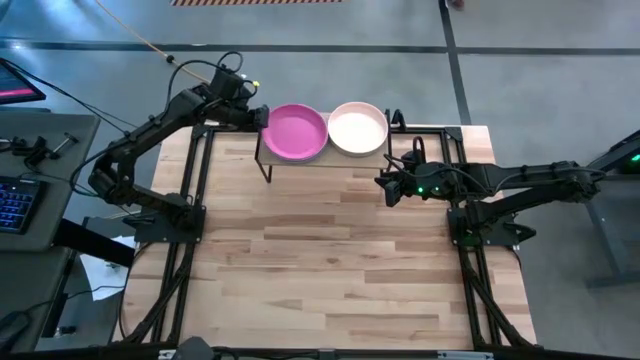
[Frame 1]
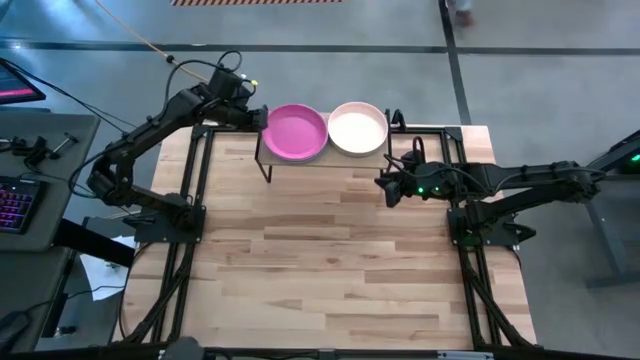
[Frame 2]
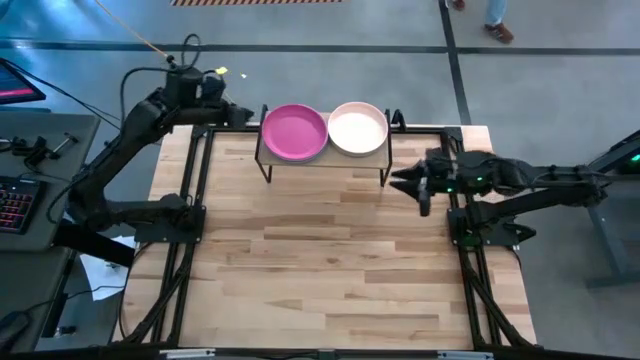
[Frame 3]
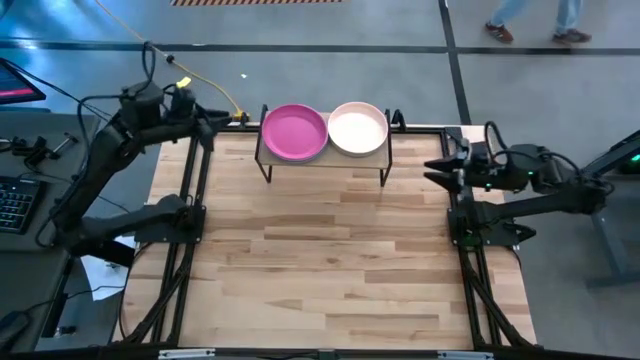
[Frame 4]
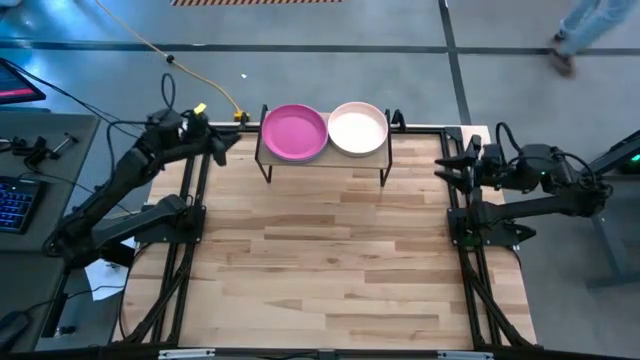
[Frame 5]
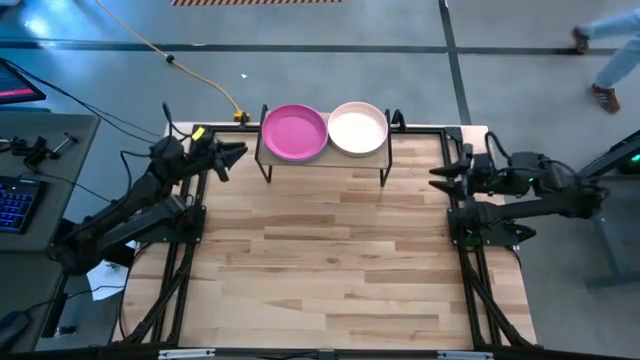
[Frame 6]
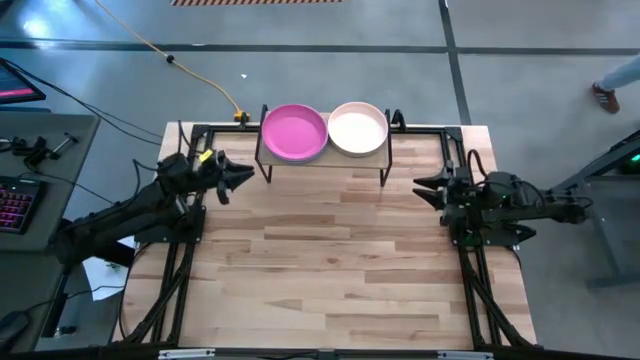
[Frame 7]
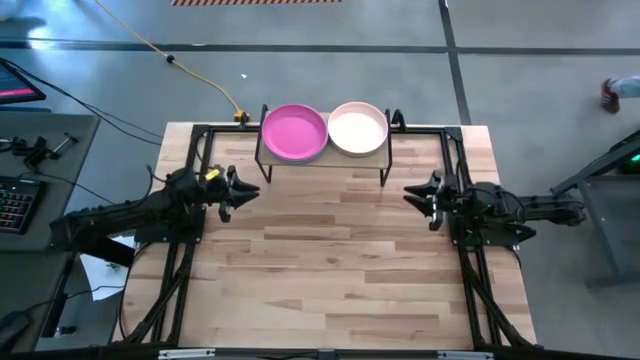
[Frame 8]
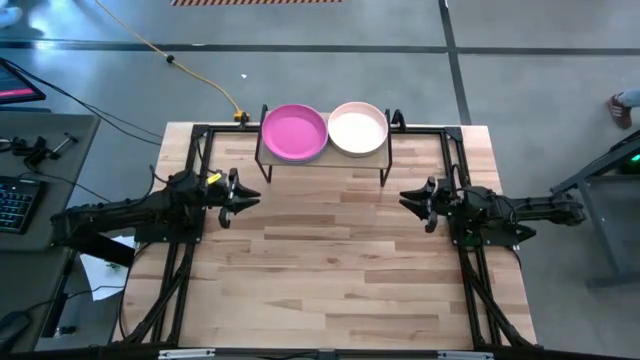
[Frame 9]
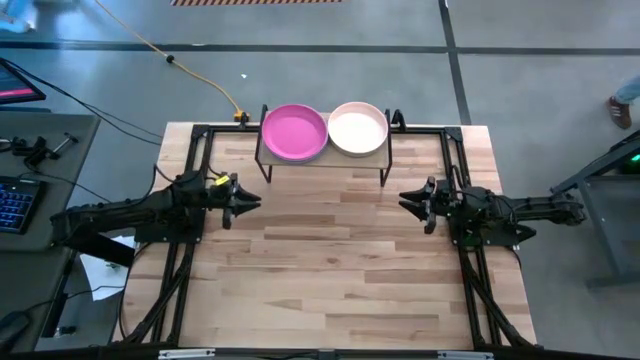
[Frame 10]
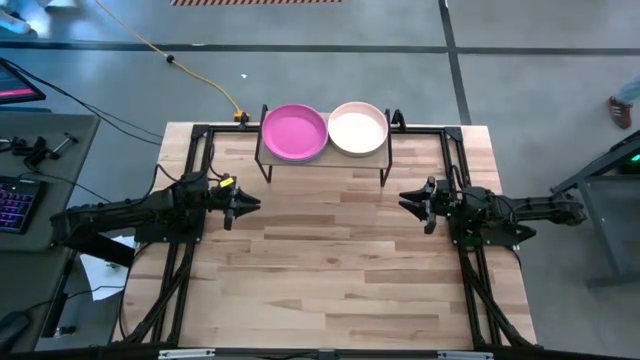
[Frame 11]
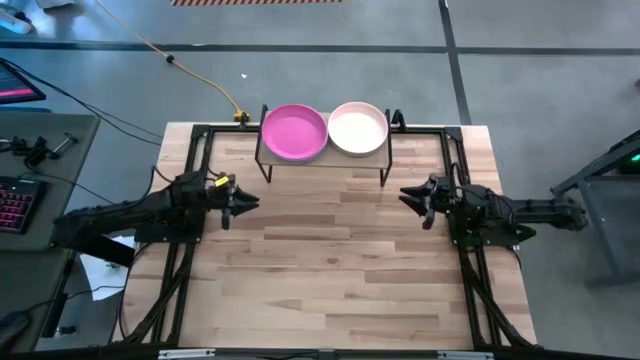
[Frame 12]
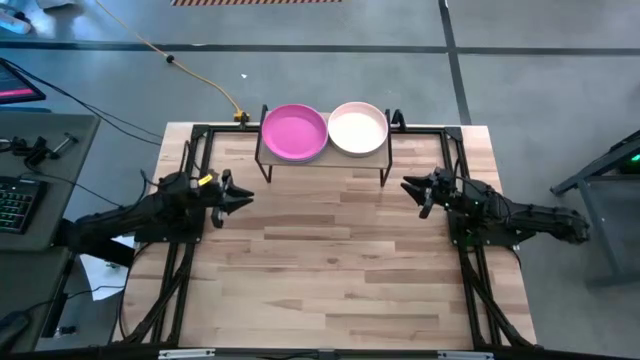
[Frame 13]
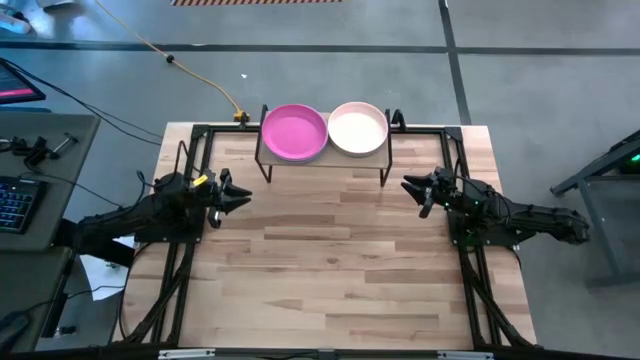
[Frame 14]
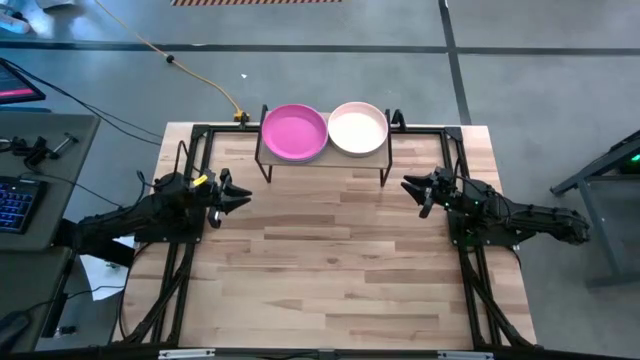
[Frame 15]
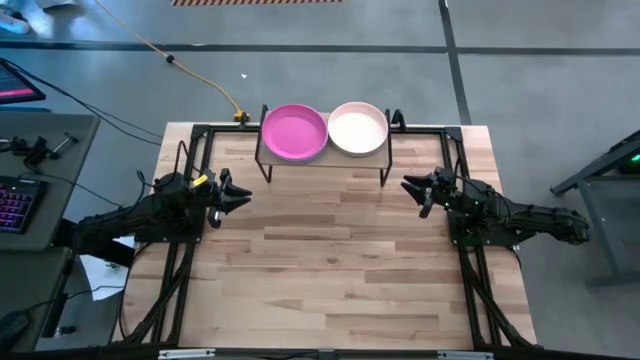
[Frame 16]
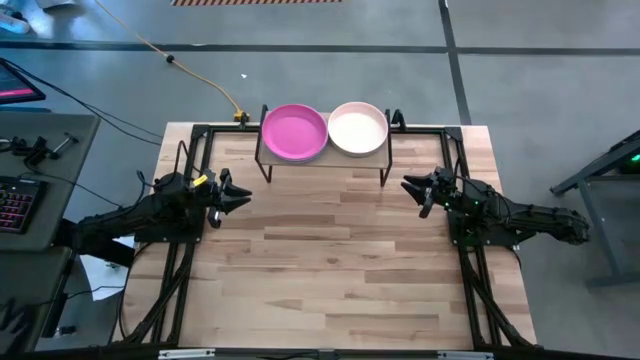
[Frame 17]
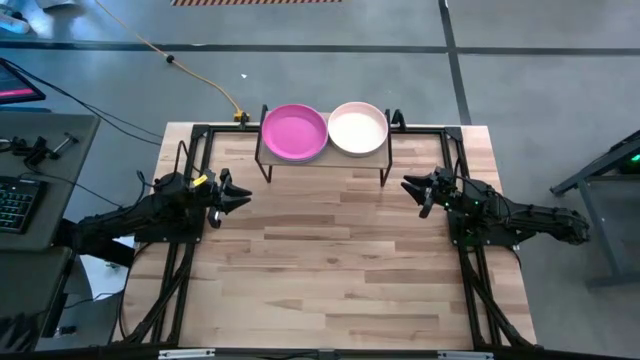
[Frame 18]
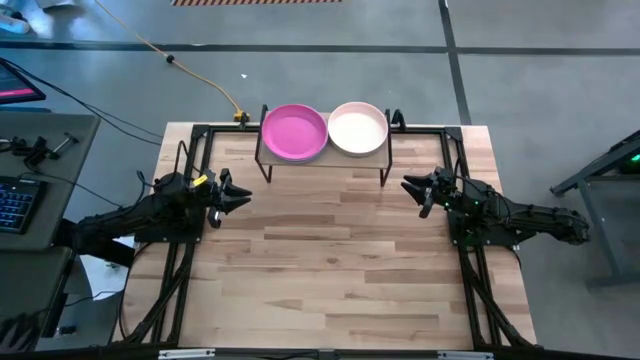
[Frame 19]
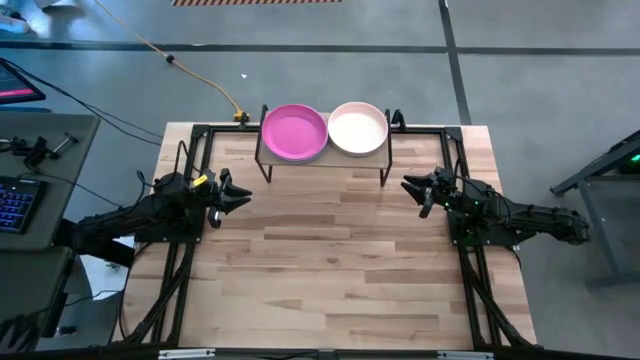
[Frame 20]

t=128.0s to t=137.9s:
Task: Place and stack plates onto a shelf
Return to Home Position

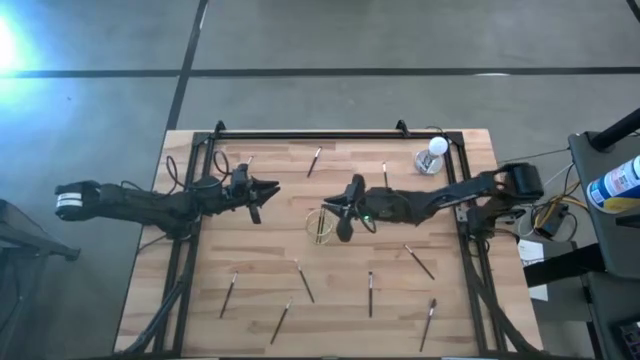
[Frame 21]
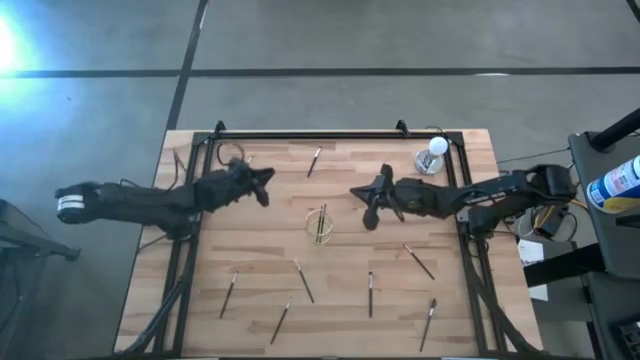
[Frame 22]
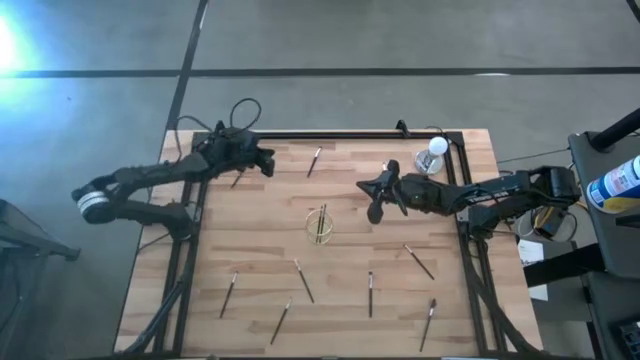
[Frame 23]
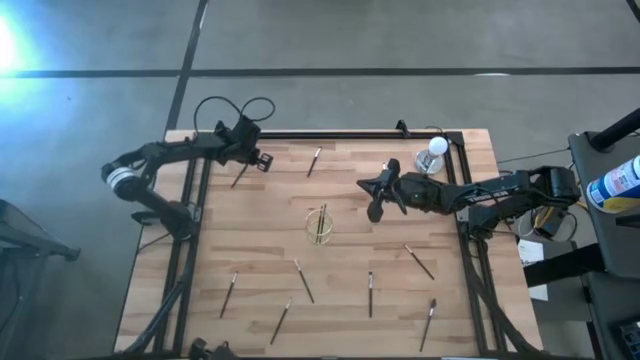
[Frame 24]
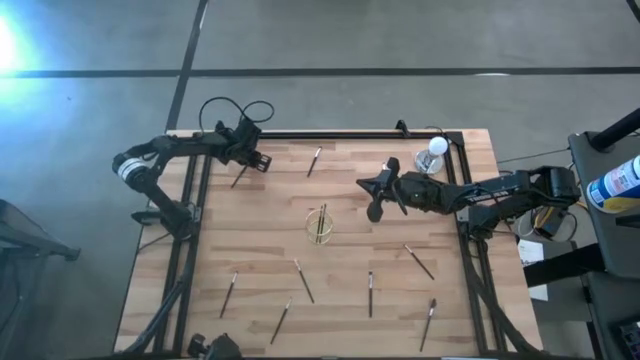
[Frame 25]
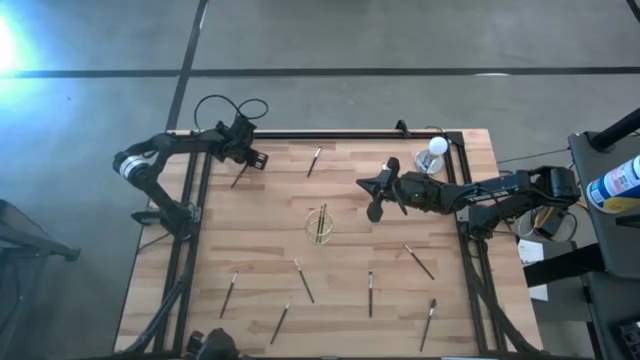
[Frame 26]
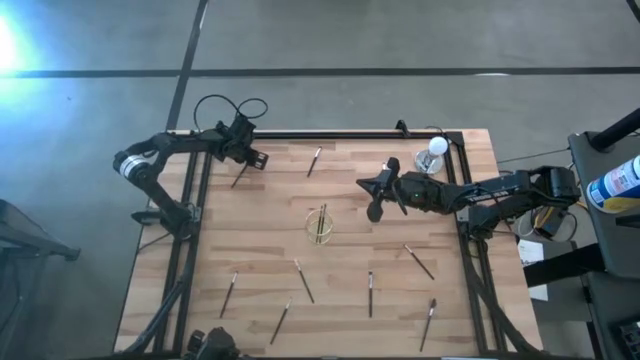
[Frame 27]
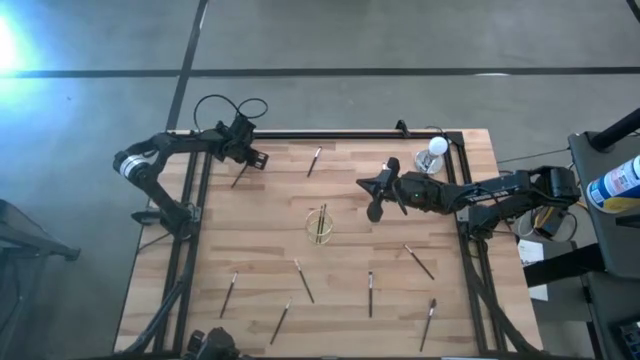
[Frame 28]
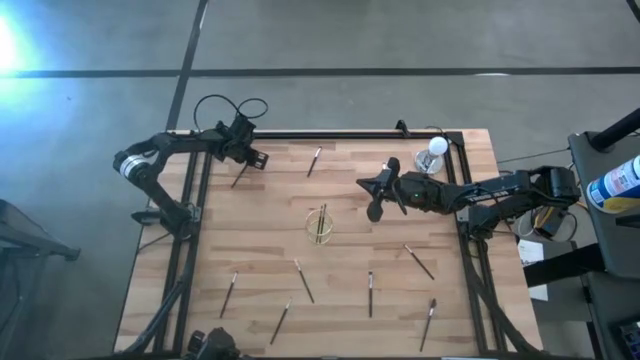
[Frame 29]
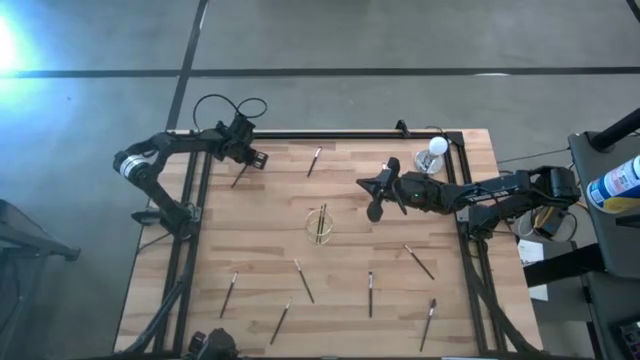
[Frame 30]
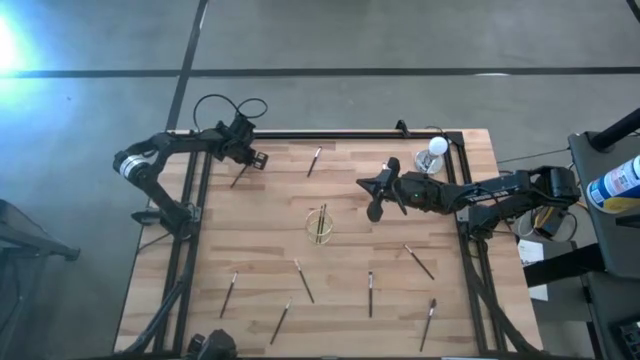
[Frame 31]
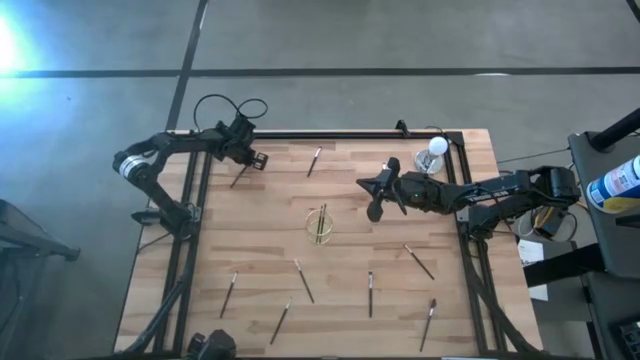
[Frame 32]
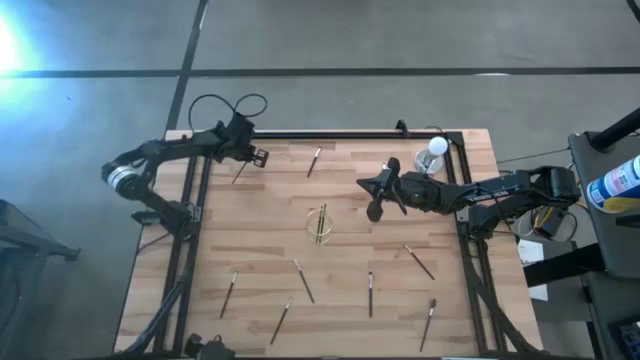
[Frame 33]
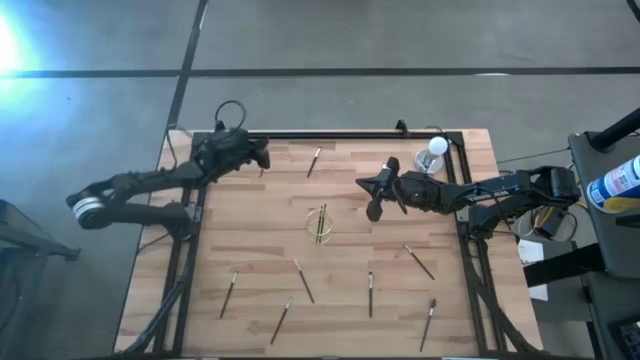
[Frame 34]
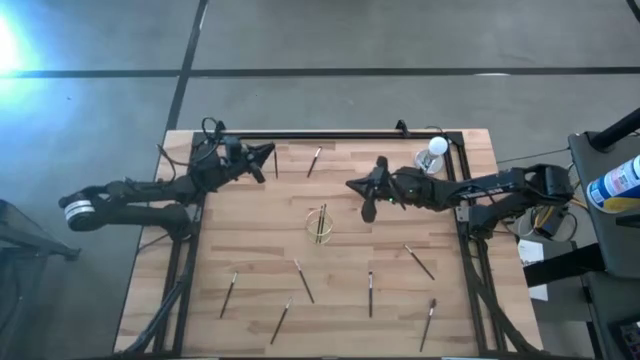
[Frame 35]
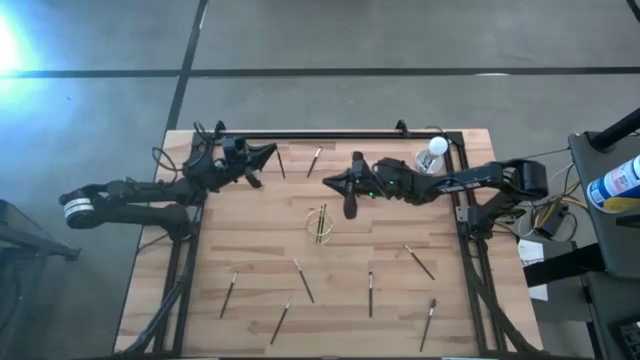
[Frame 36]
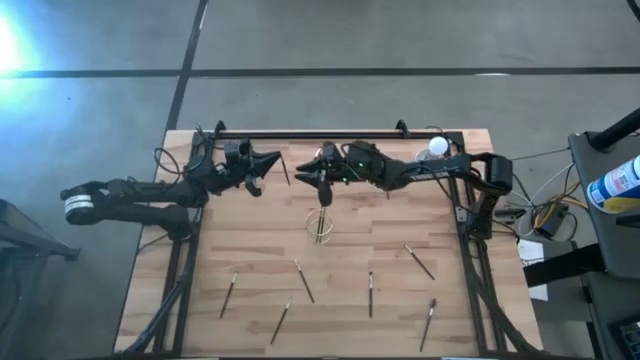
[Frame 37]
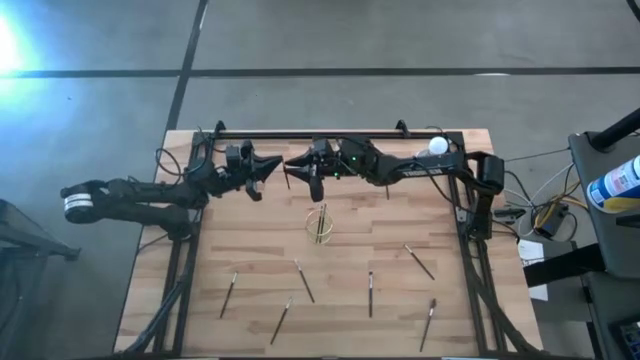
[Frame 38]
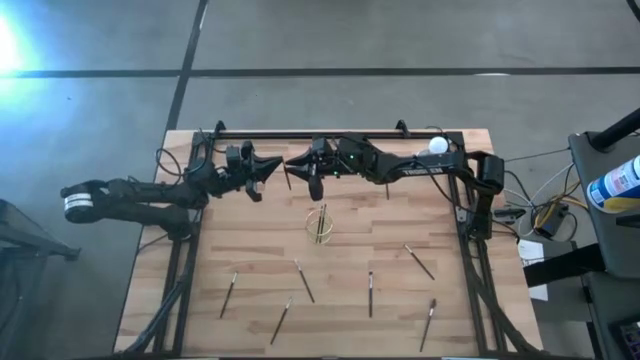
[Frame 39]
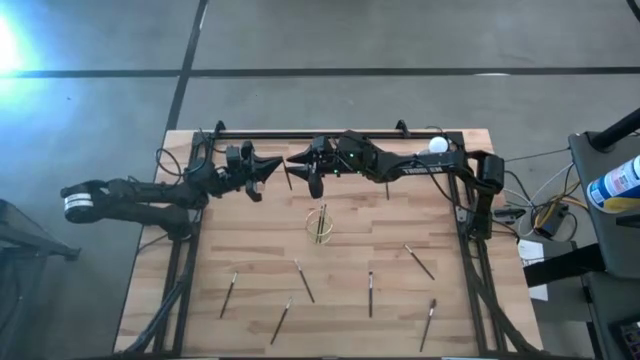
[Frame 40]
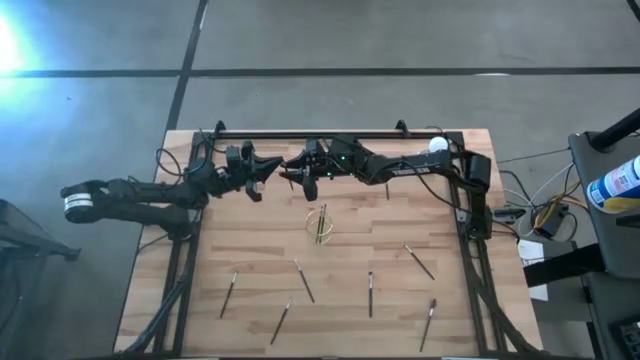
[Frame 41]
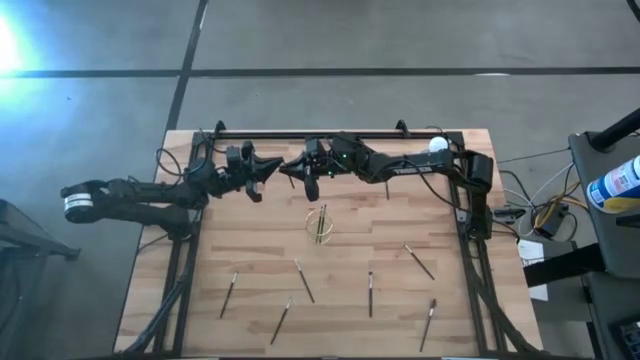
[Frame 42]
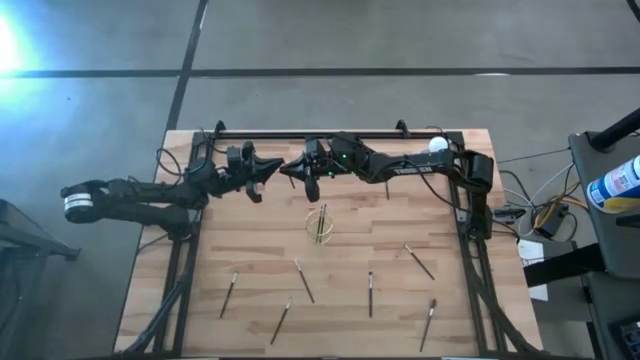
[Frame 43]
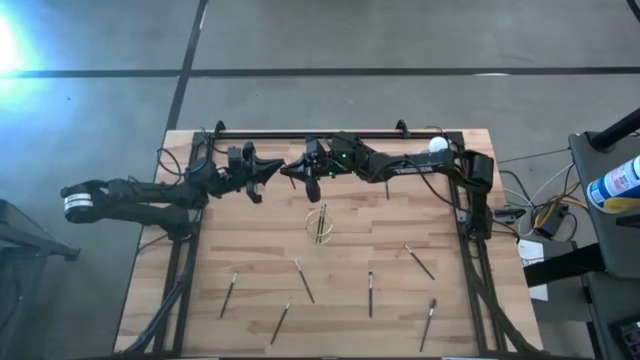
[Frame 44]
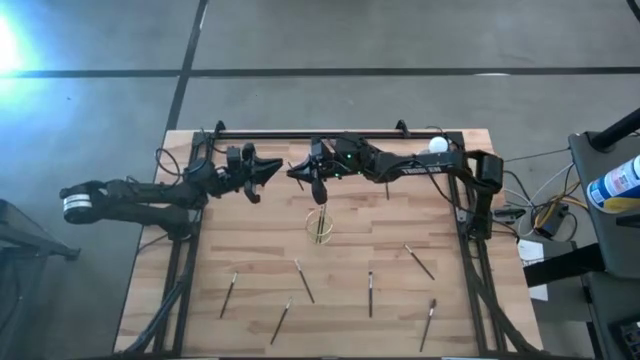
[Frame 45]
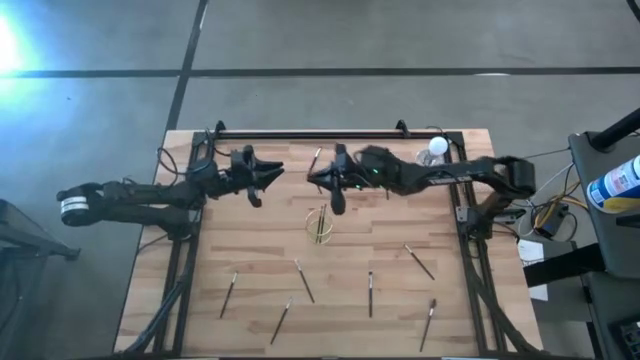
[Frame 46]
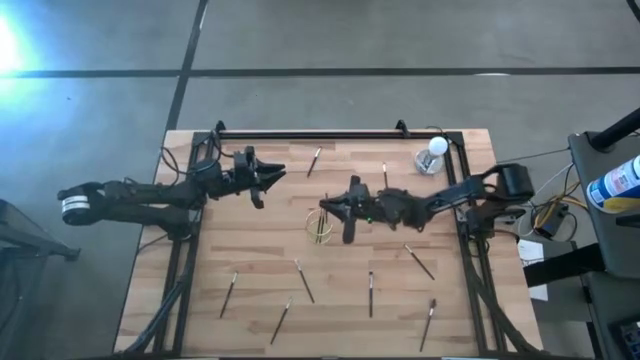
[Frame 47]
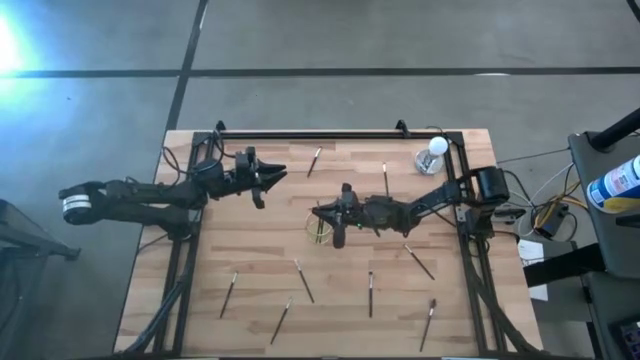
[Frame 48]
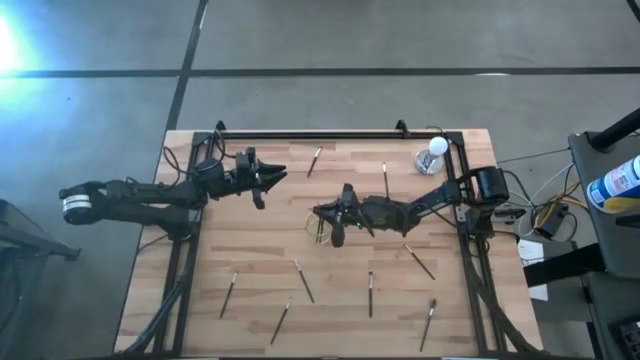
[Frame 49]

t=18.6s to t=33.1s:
Task: Pick & Place Makeup Brushes
Put the eyeshadow brush into the gold makeup brush holder
